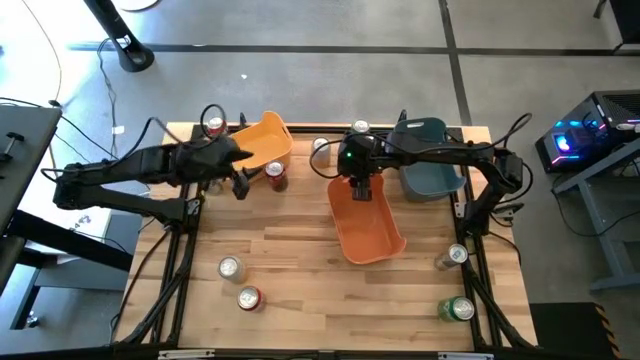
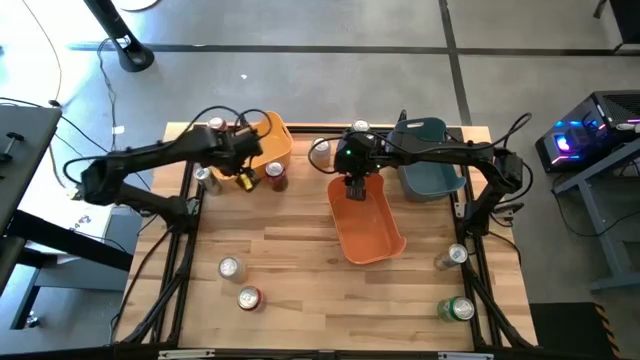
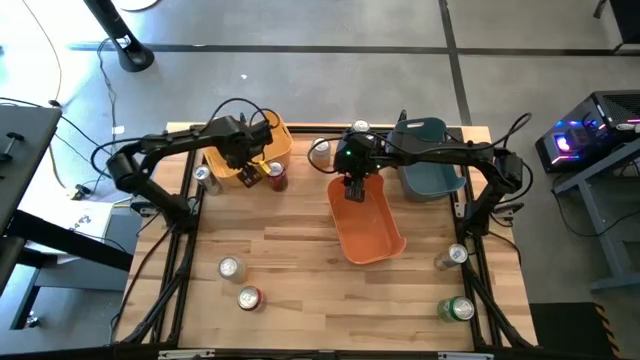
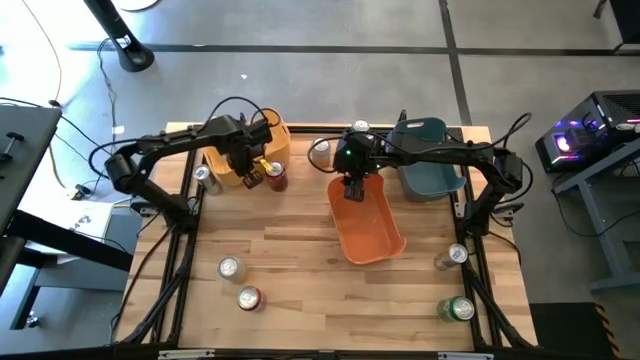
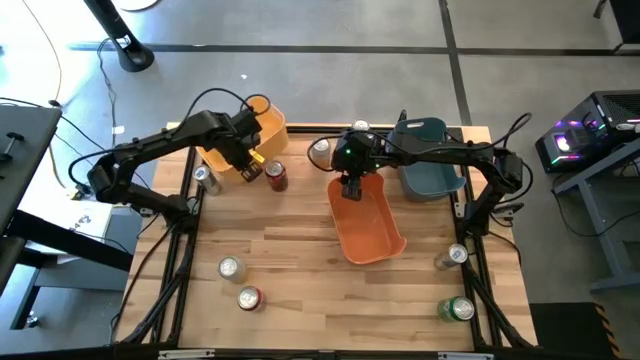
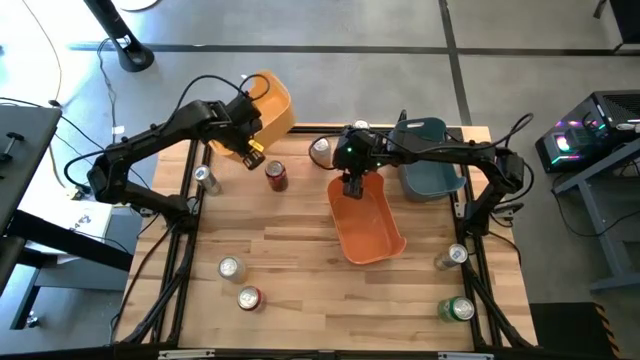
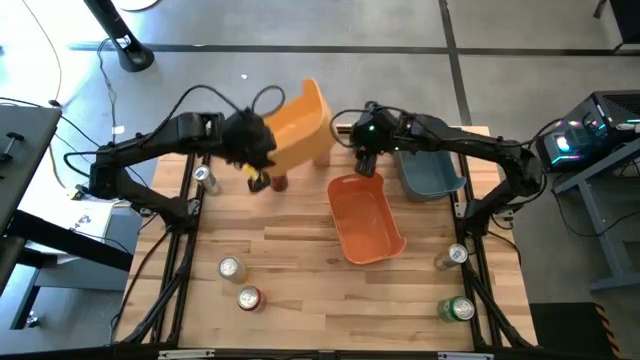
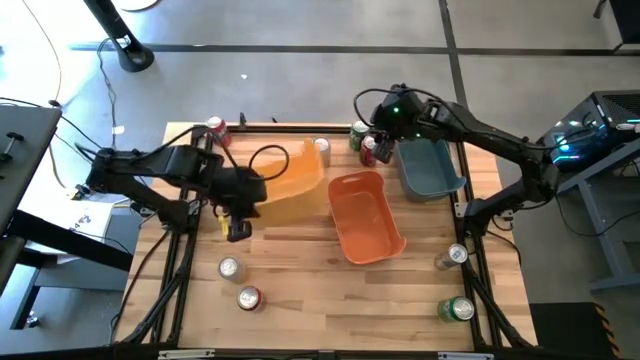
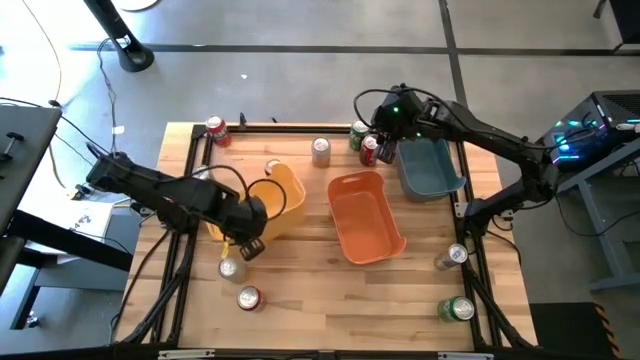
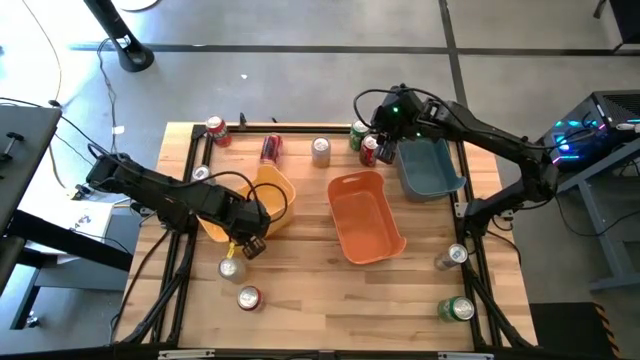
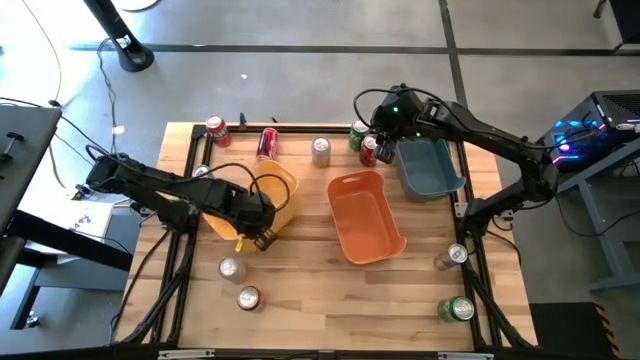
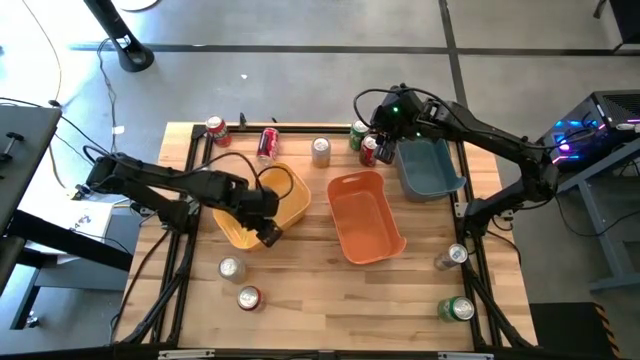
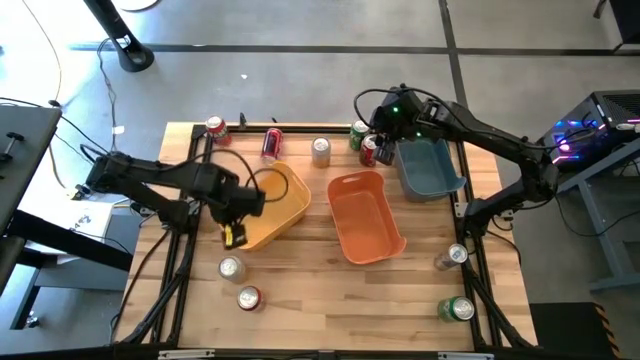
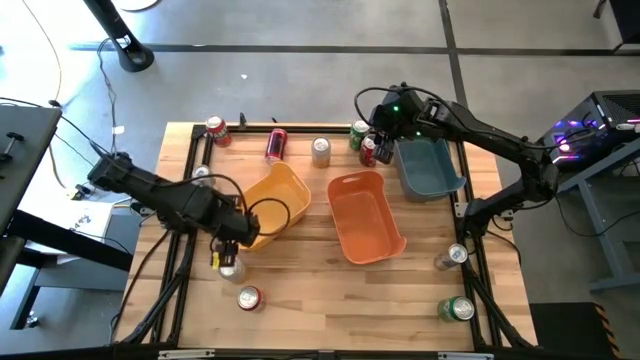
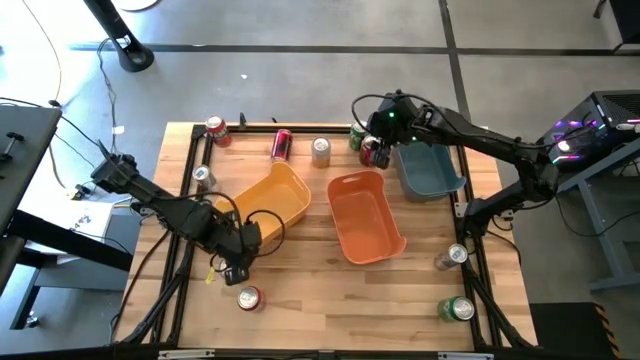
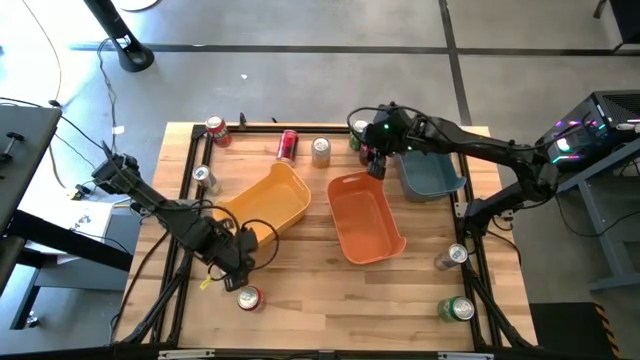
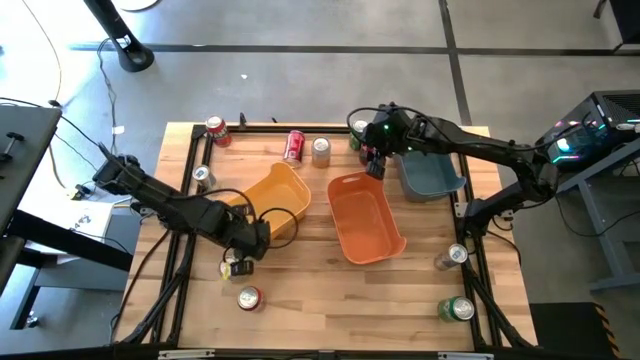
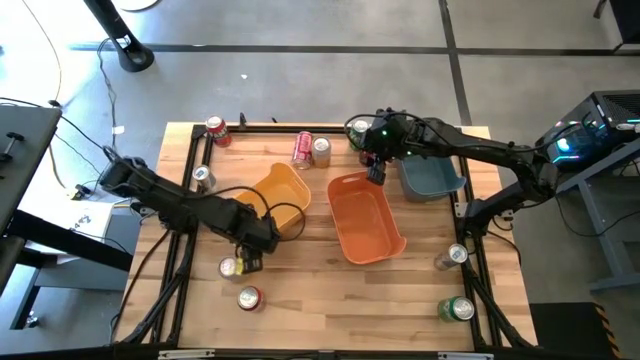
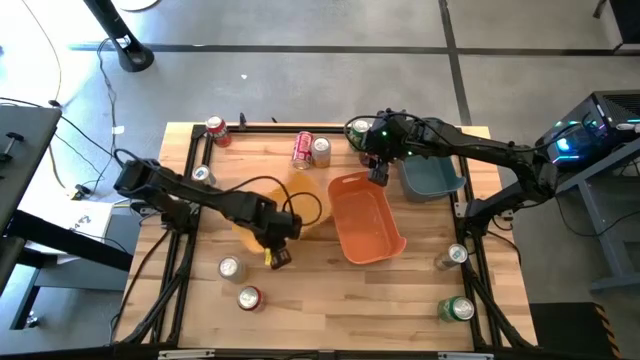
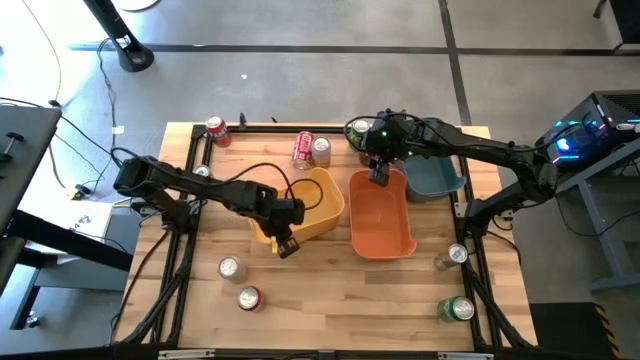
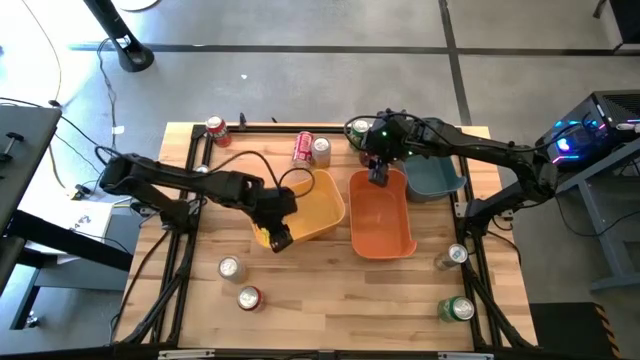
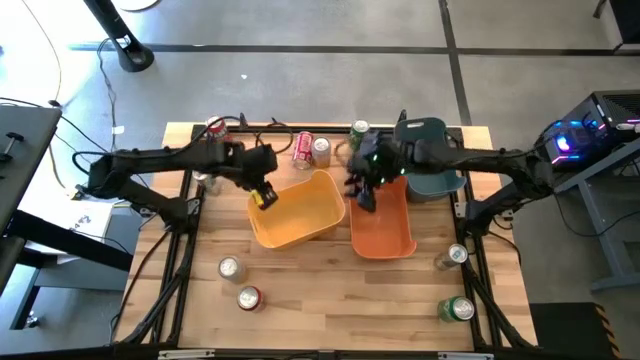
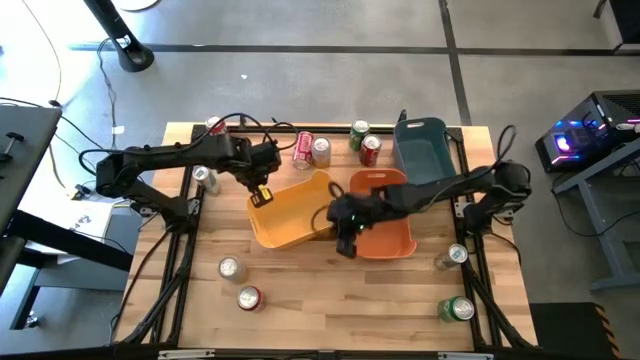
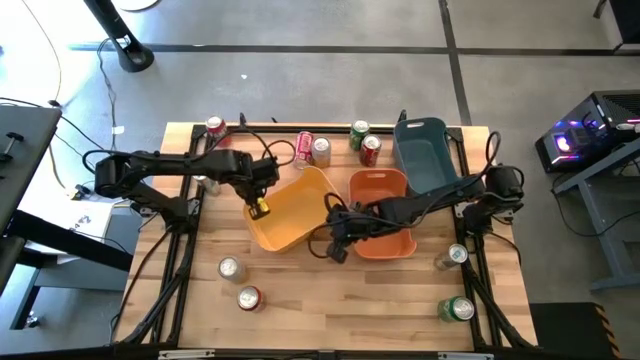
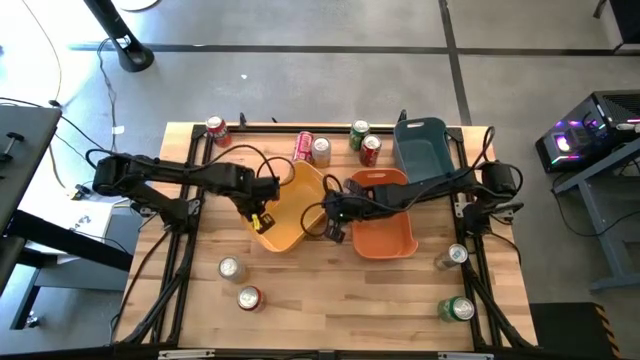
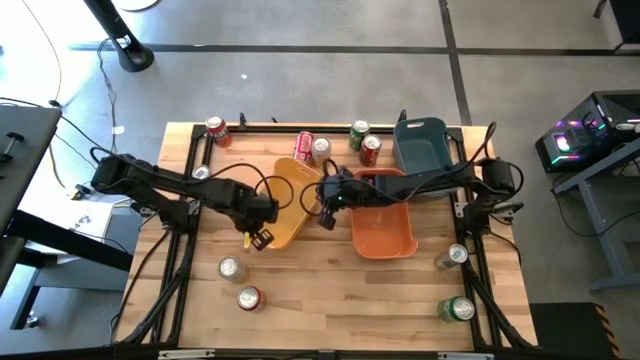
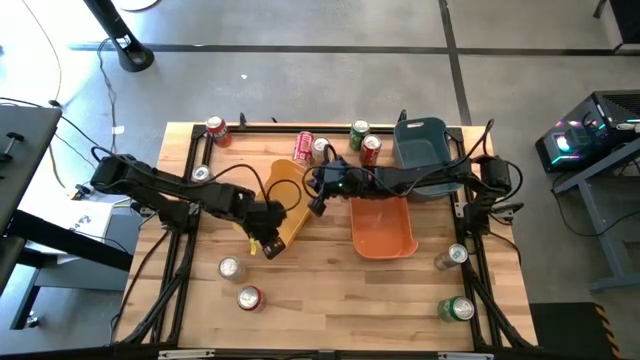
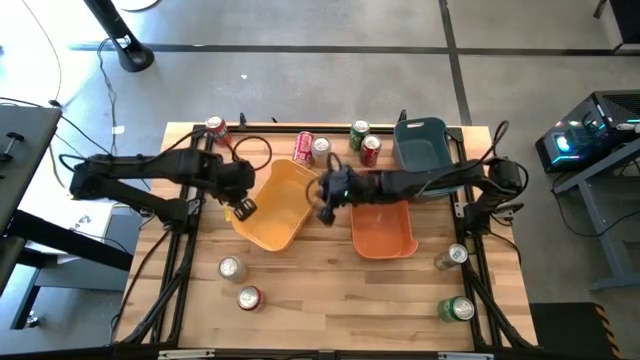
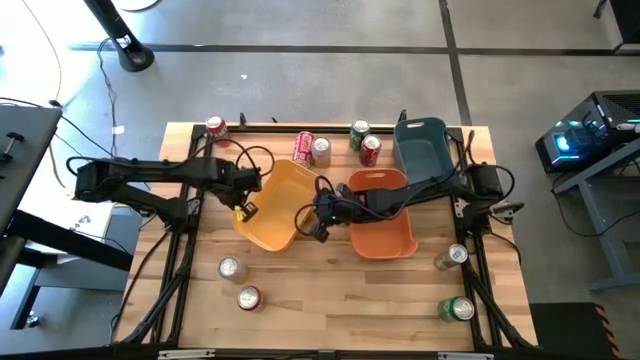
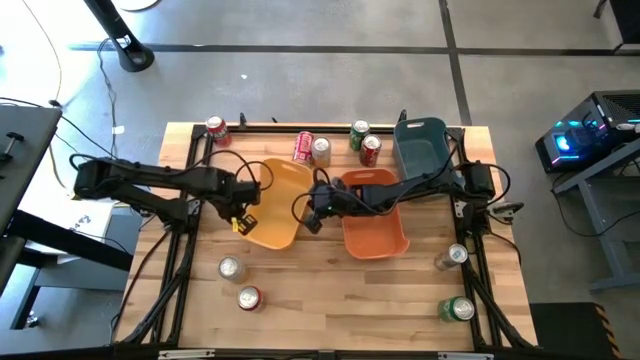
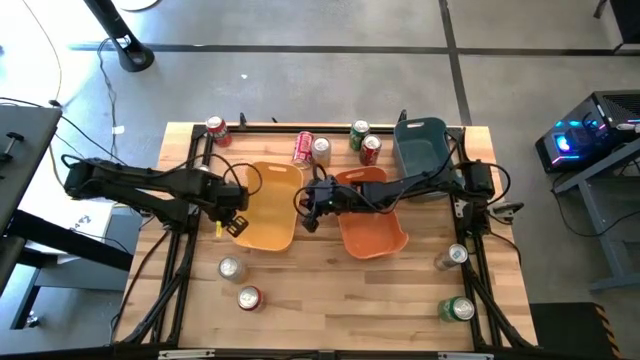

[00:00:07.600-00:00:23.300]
Task: Sort soda cans
Move the yellow bin to the center of the table

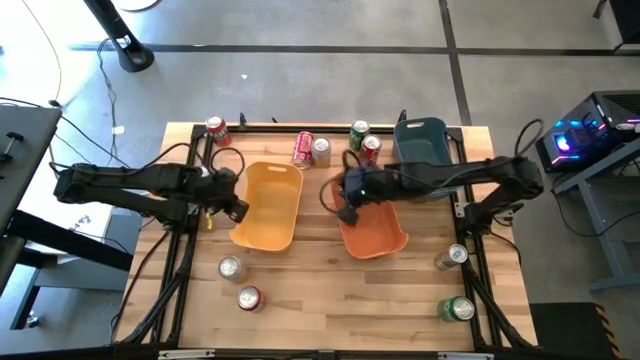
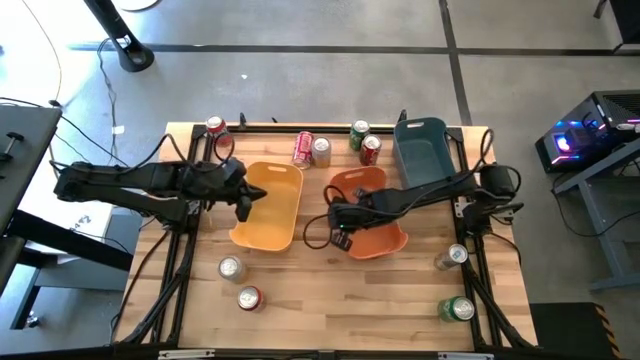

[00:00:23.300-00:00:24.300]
Adjust the orange bin

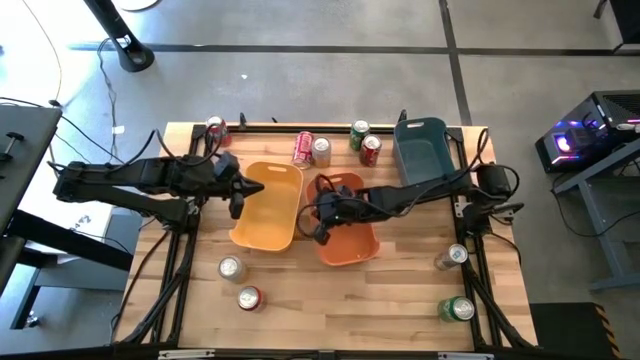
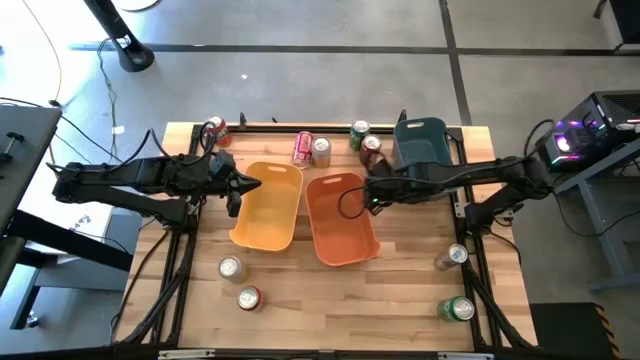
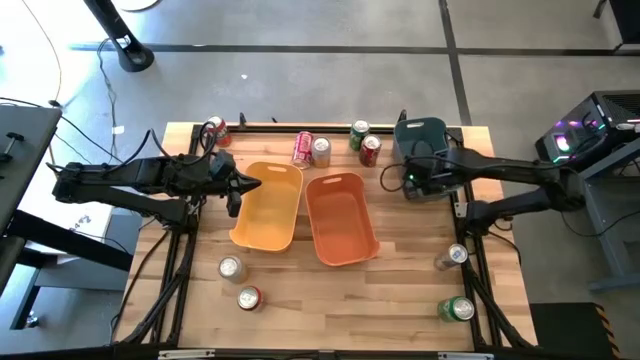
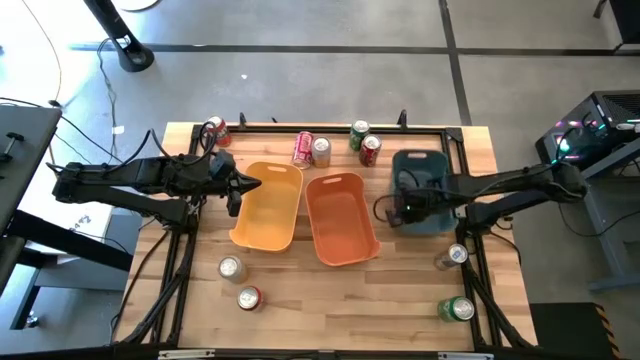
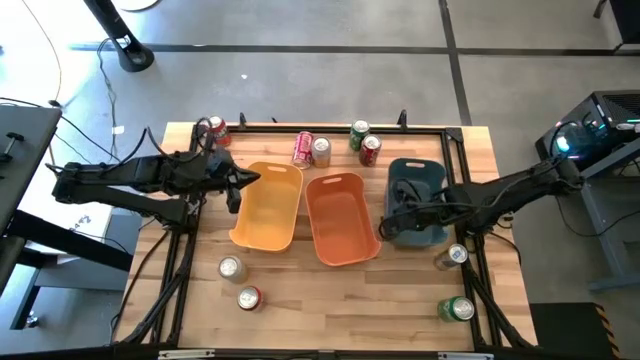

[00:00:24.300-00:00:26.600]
Move the green bin to the middle right of the table

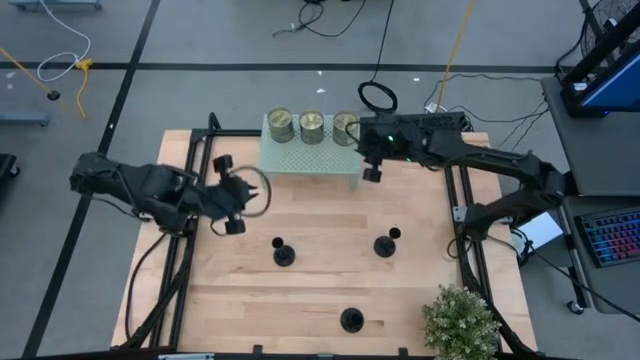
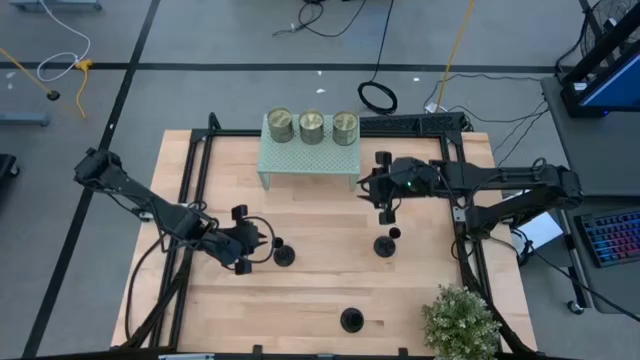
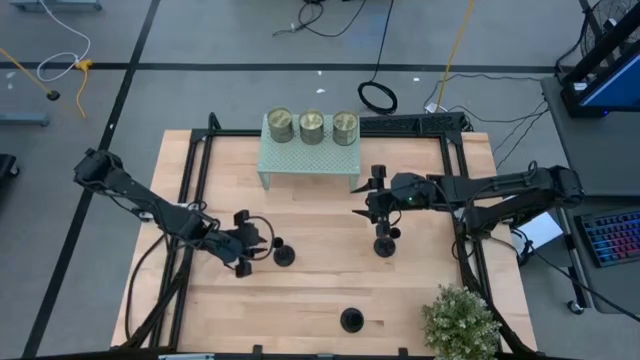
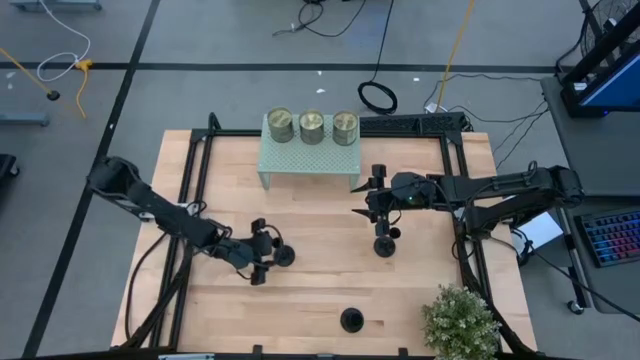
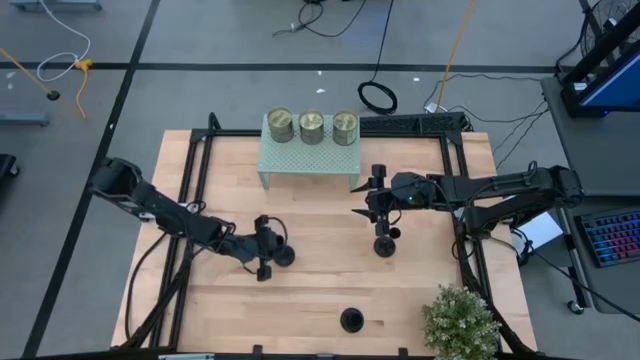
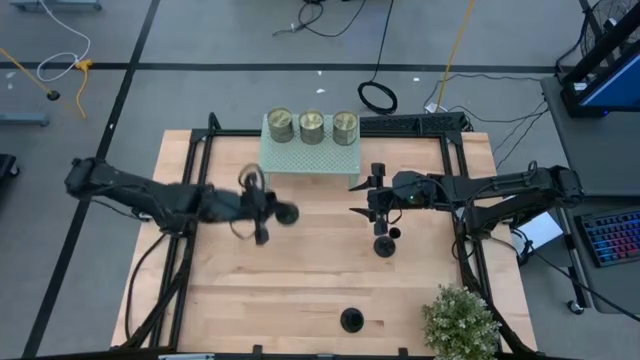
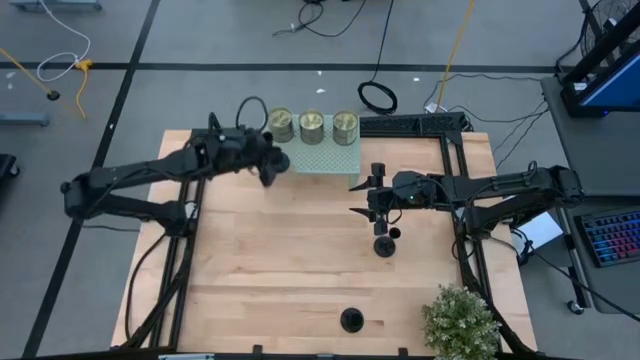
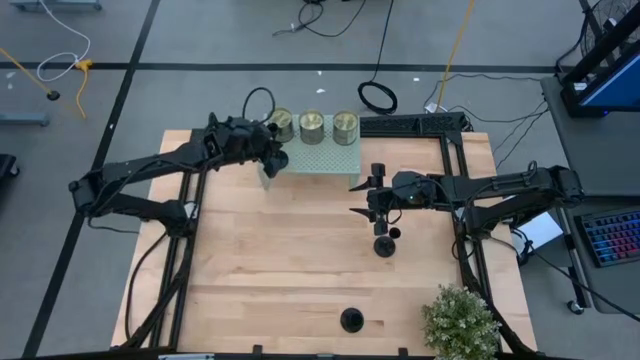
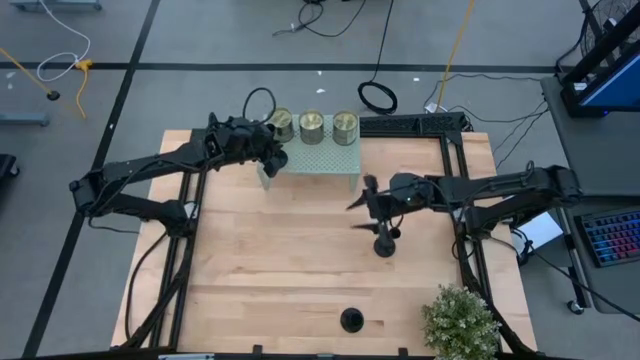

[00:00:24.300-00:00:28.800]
Task: Pick & Place candle stick holders
Put the top left black candle holder on the shelf
